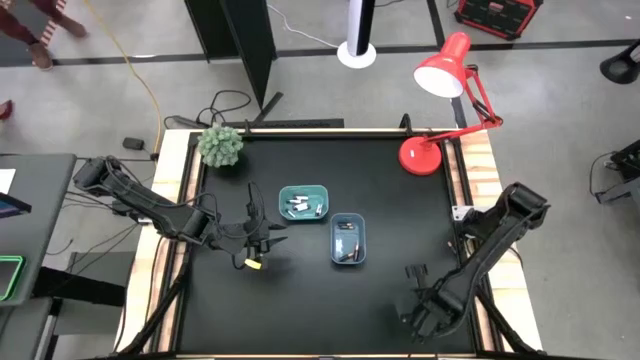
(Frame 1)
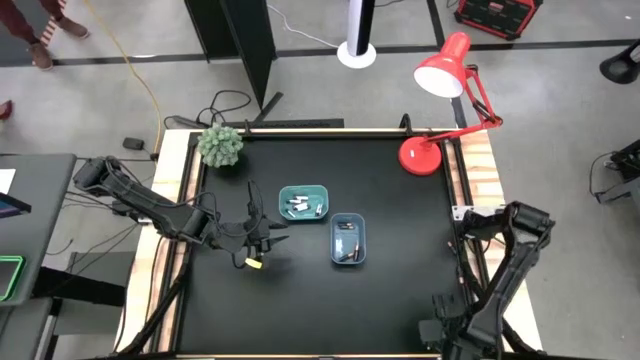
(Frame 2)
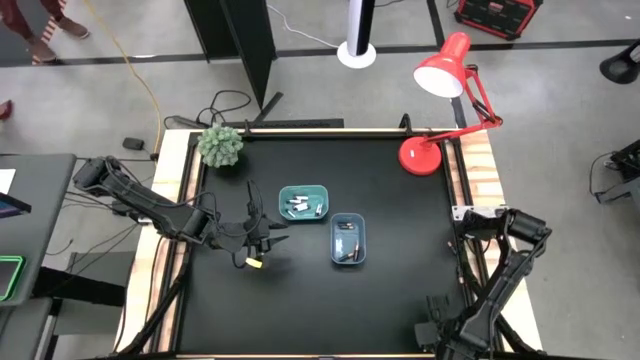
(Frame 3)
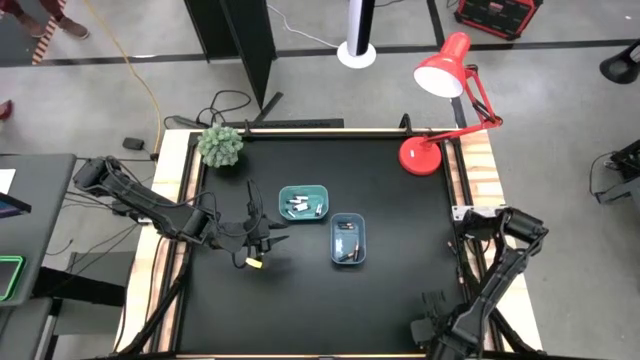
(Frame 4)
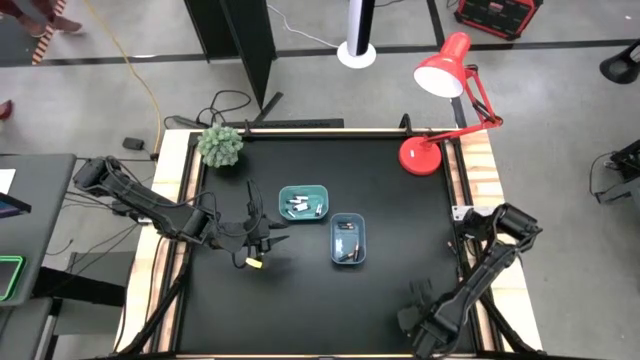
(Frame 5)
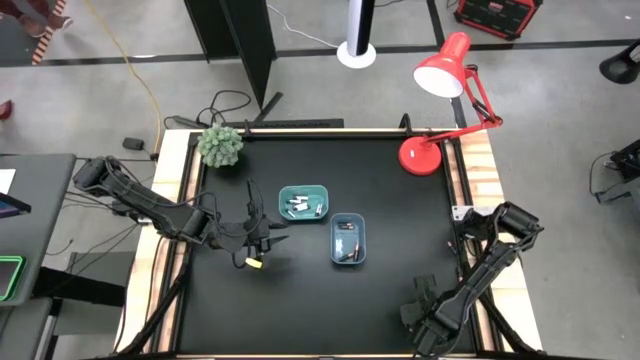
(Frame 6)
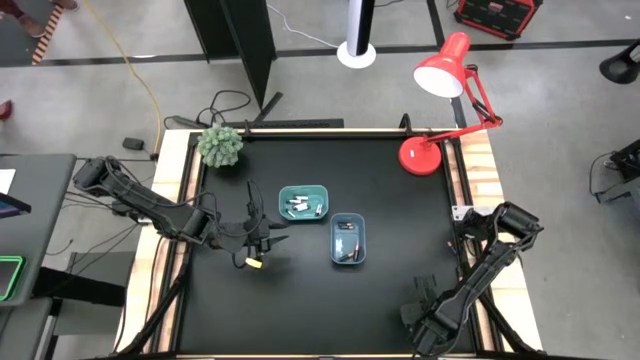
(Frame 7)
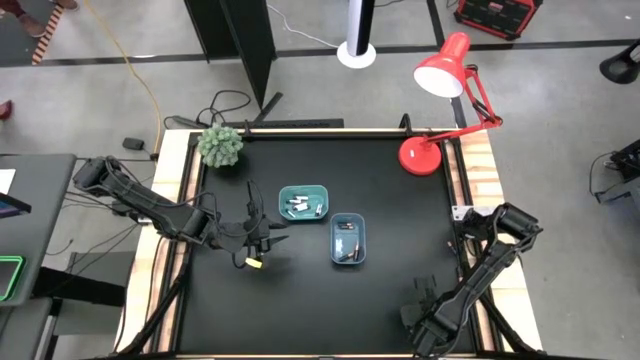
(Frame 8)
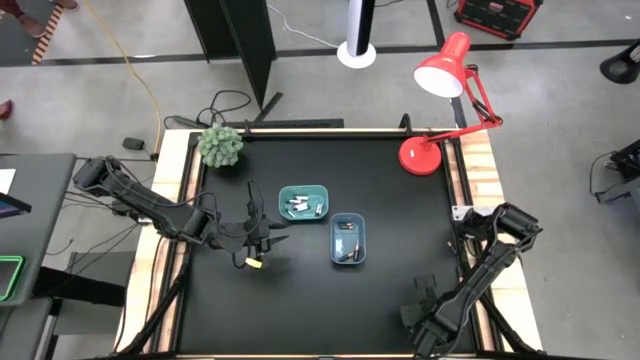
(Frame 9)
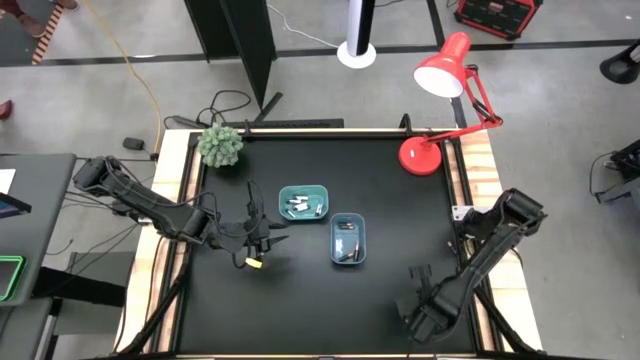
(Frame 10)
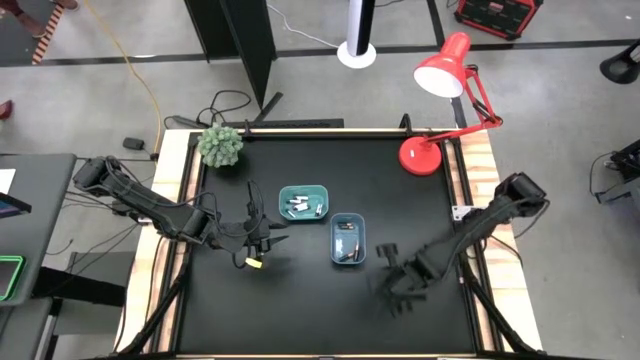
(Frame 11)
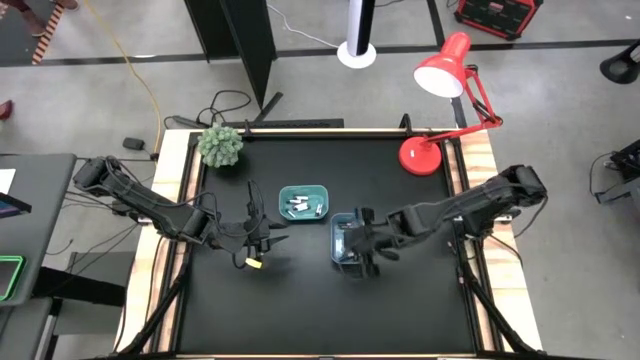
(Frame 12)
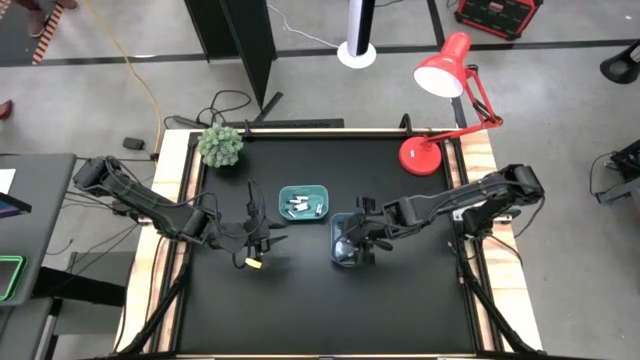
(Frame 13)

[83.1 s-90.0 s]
Task: Sort batteries
Put the black battery into the blue bin

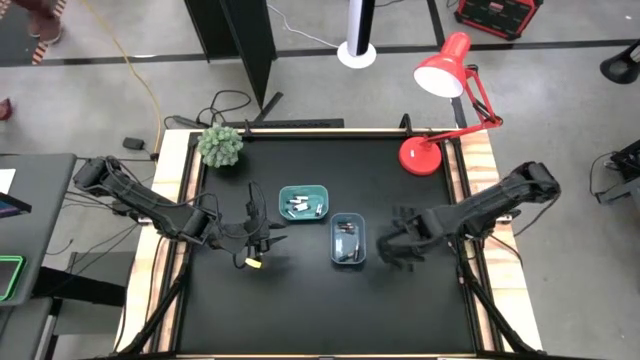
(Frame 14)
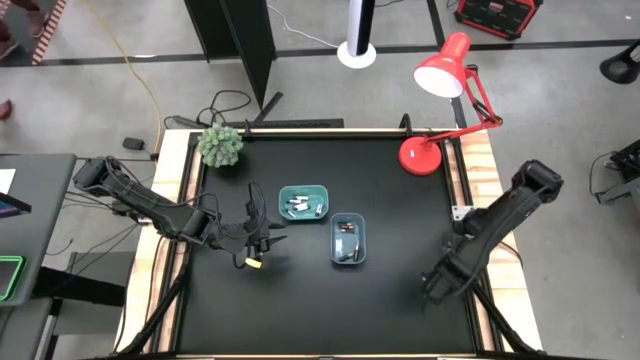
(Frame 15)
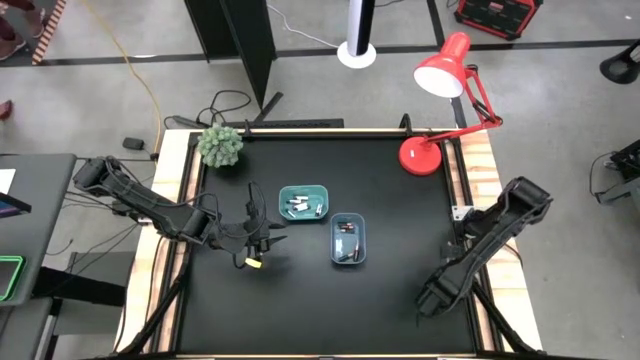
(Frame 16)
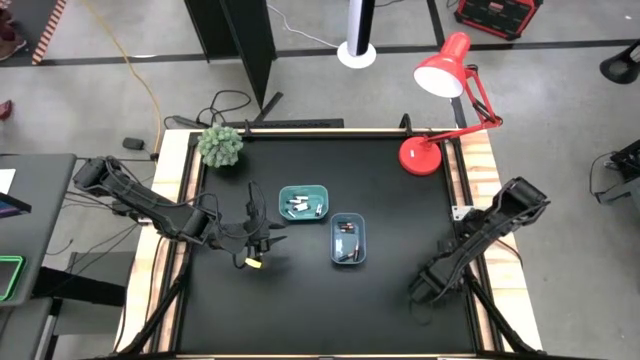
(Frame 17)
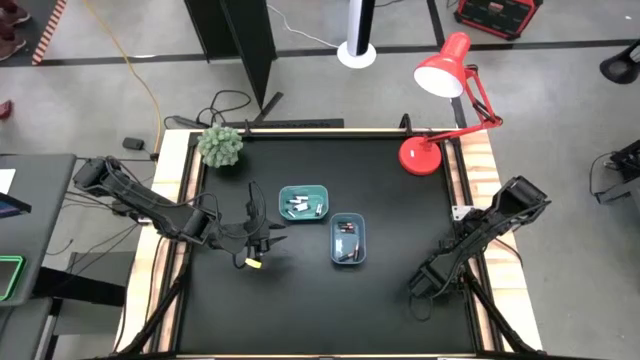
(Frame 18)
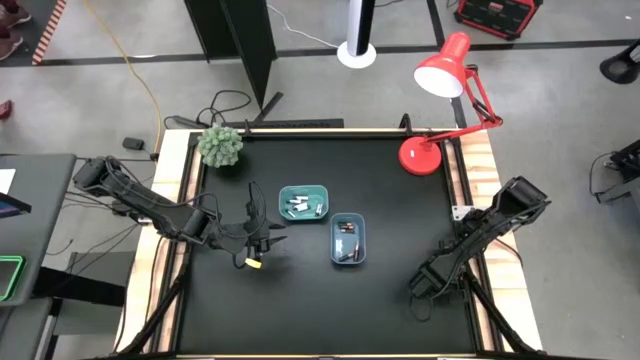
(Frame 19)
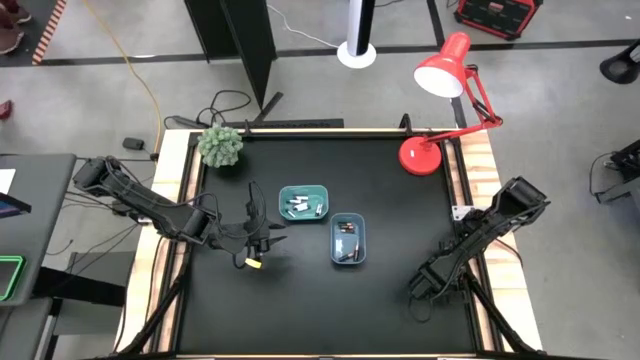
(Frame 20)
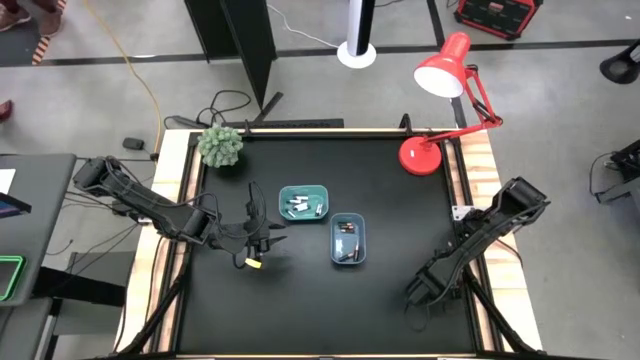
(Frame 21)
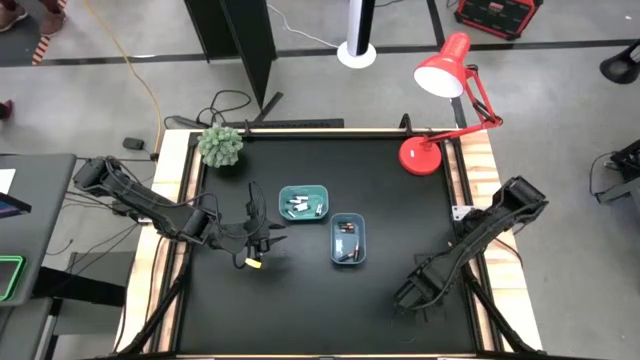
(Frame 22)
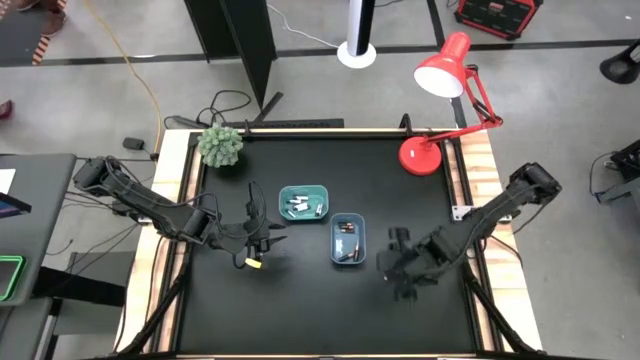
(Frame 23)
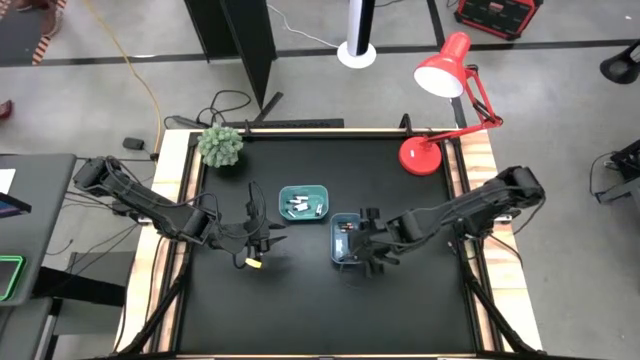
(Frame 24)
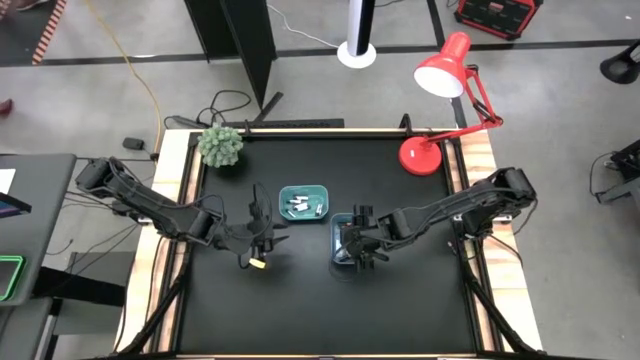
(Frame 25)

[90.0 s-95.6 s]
Put the black battery into the blue bin

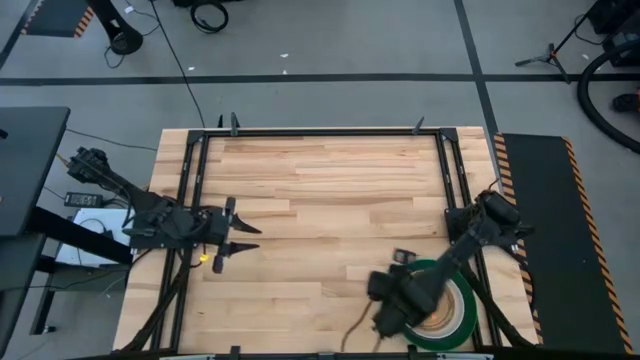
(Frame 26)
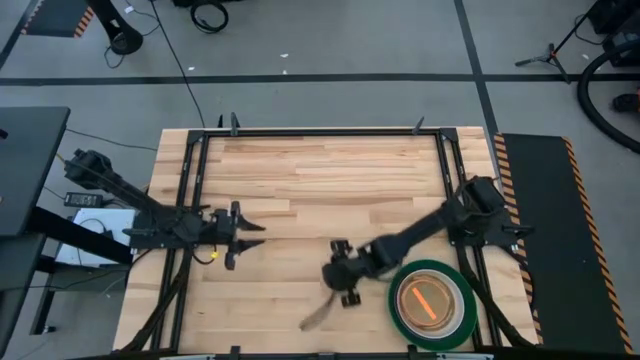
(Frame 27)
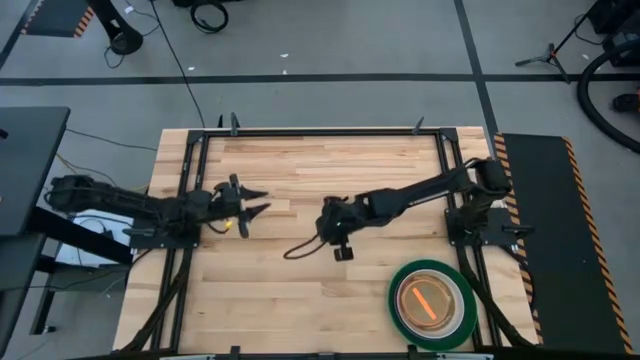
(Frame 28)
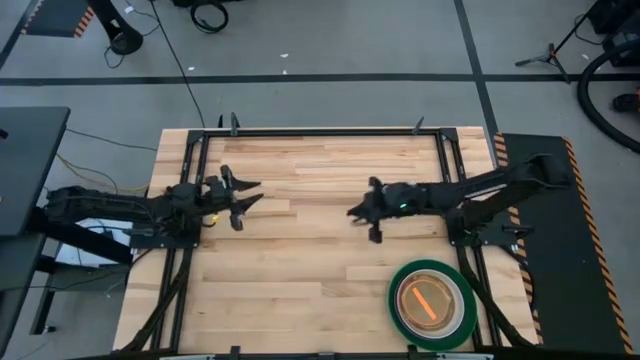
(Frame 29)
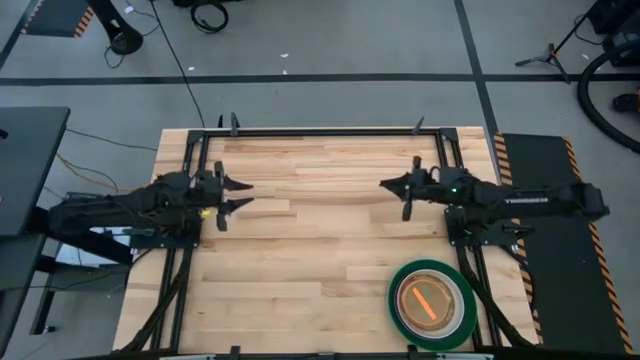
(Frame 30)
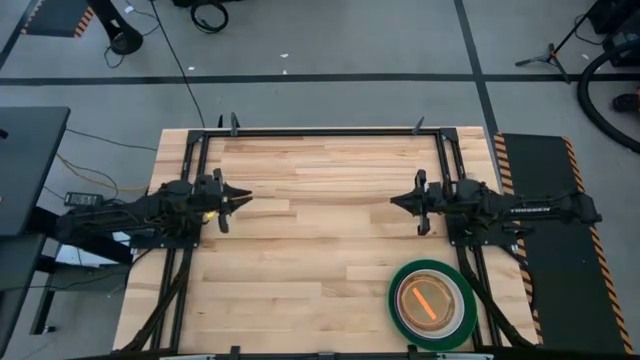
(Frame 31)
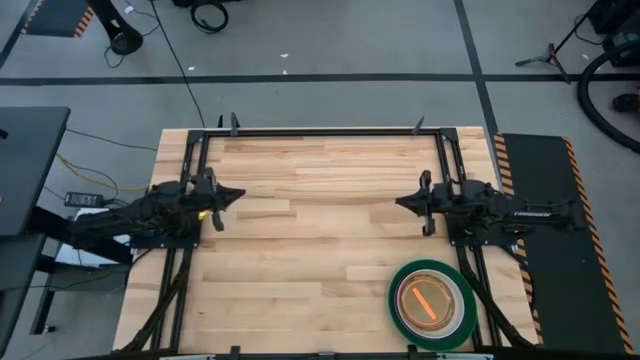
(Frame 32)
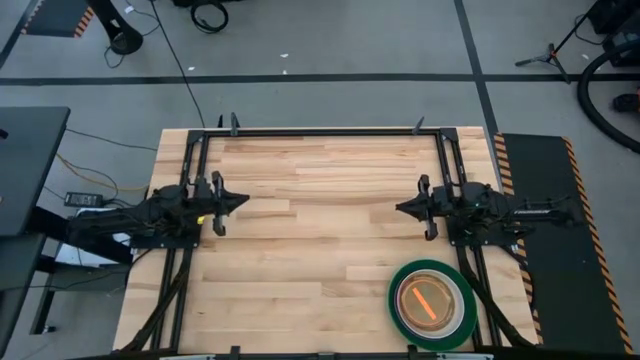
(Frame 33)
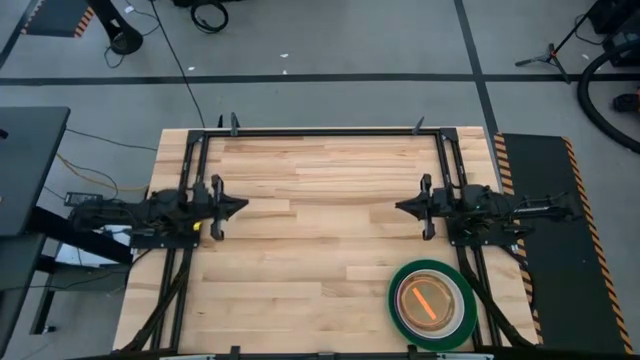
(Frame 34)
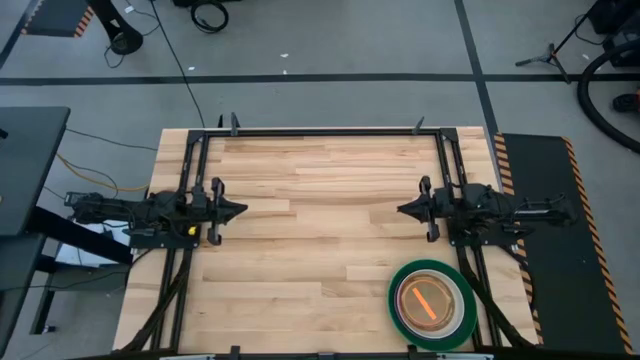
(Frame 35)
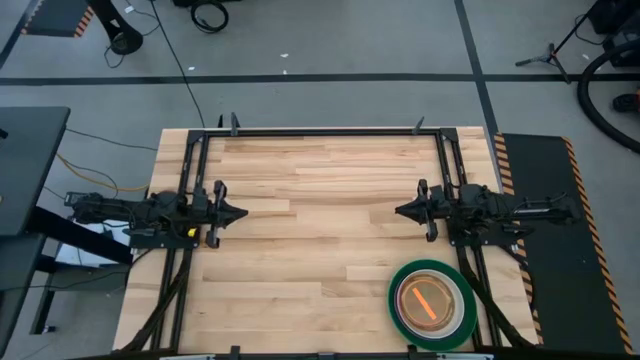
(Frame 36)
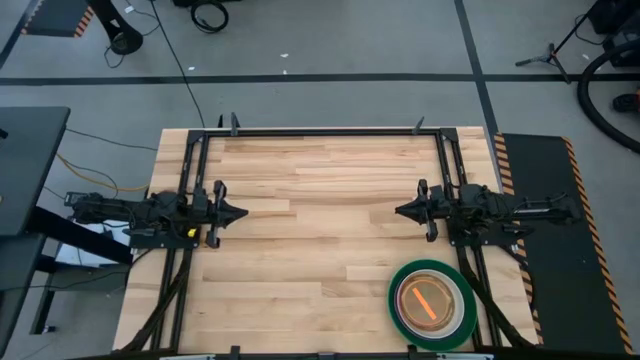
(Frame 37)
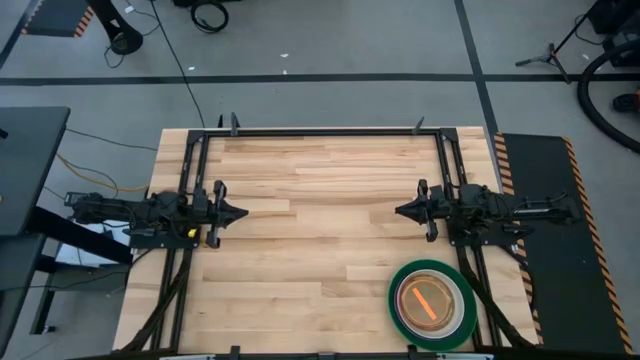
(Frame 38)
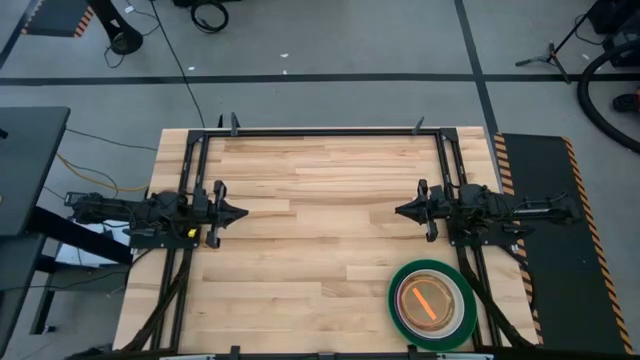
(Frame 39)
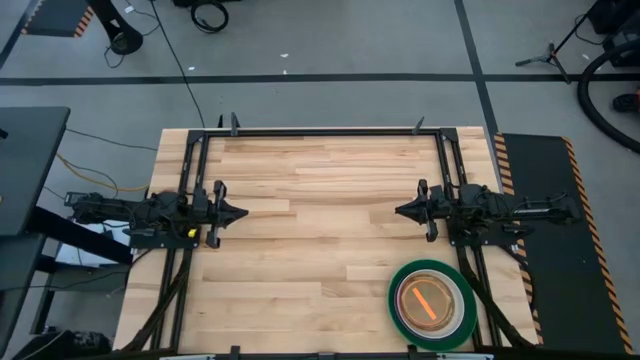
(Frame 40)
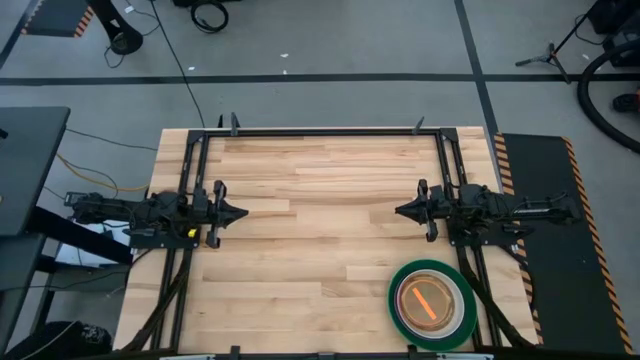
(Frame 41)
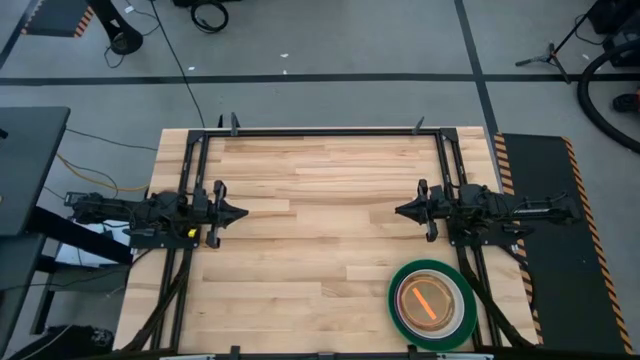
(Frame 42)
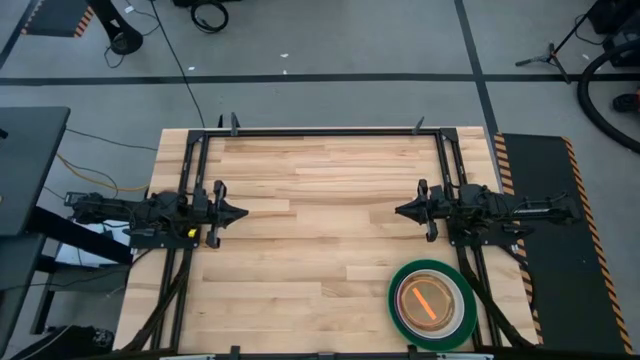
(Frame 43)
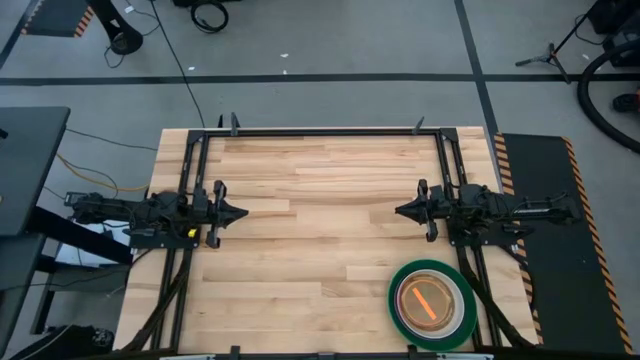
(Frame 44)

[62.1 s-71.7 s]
Task: Stack plastic plates
Return to Home Position
